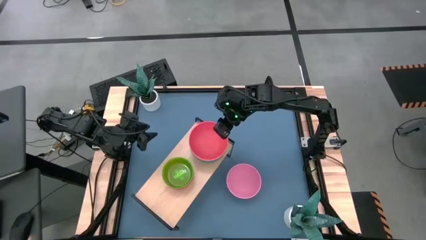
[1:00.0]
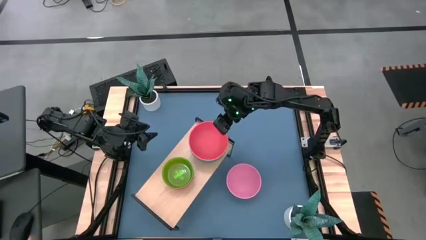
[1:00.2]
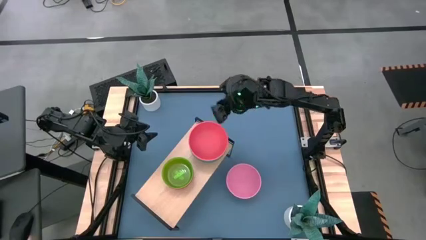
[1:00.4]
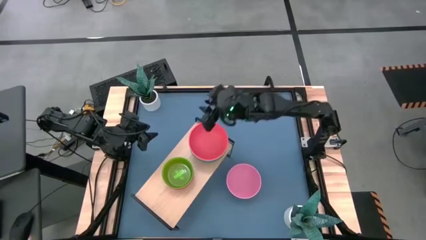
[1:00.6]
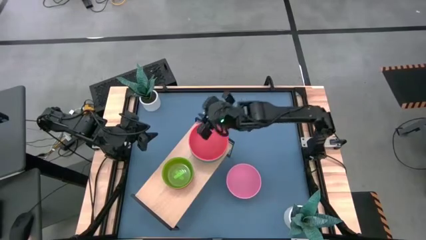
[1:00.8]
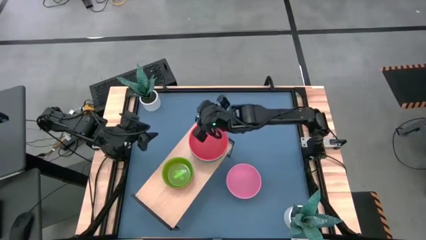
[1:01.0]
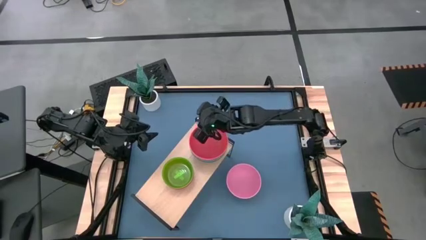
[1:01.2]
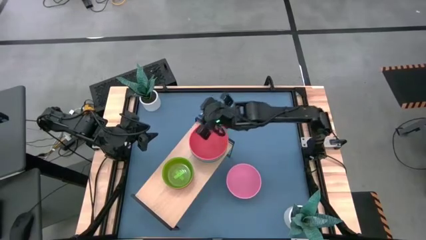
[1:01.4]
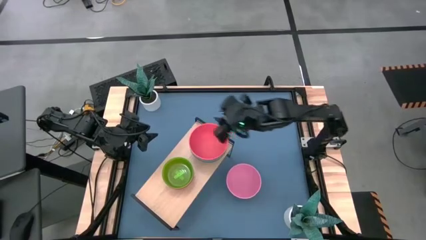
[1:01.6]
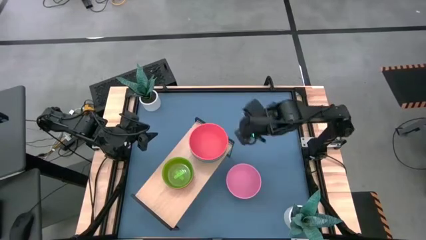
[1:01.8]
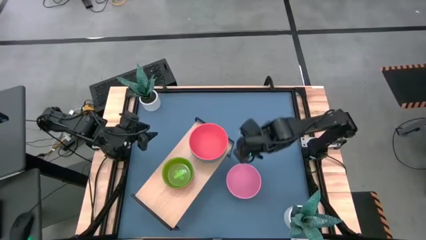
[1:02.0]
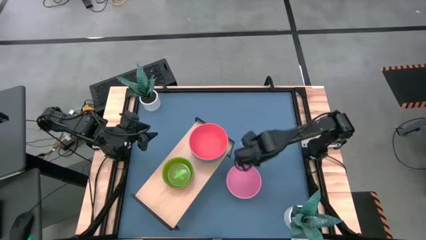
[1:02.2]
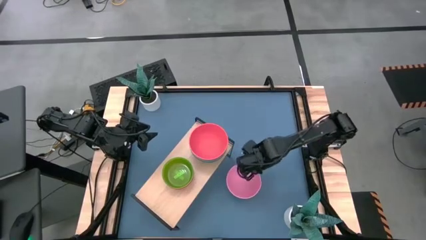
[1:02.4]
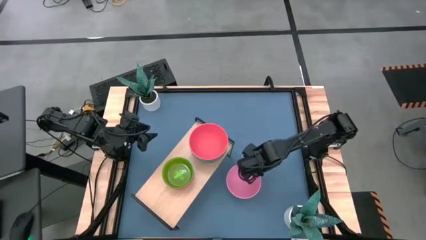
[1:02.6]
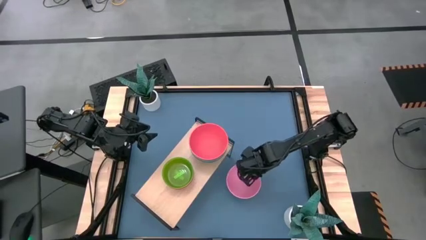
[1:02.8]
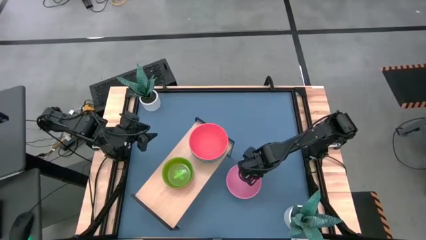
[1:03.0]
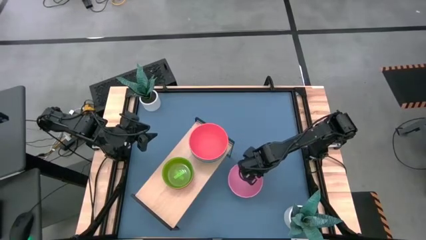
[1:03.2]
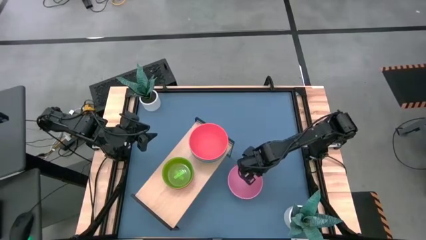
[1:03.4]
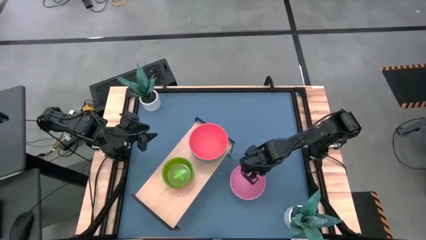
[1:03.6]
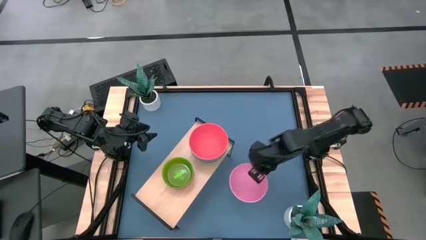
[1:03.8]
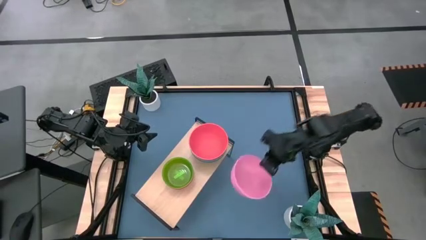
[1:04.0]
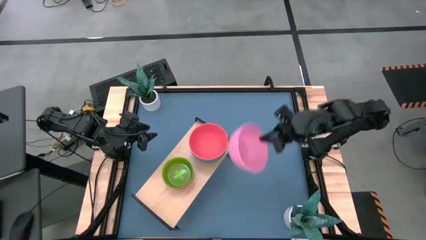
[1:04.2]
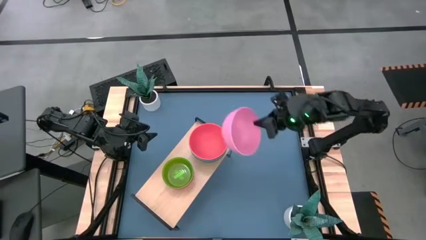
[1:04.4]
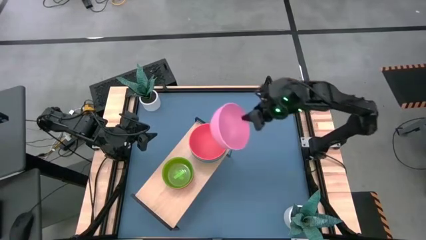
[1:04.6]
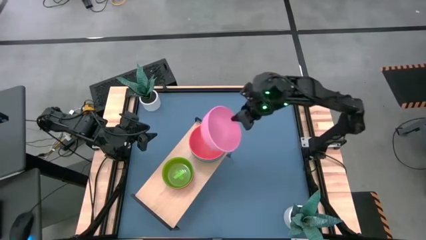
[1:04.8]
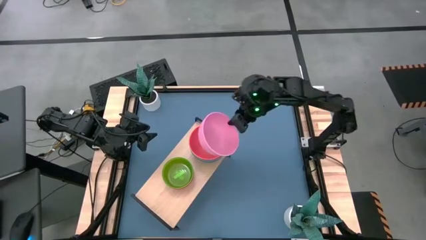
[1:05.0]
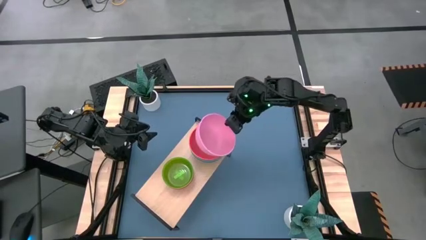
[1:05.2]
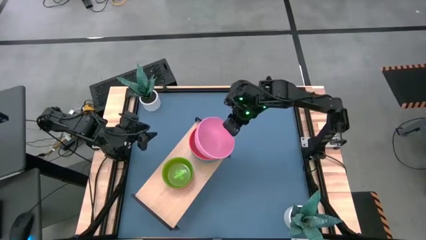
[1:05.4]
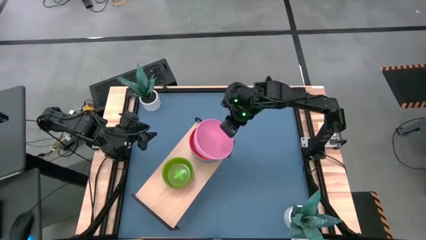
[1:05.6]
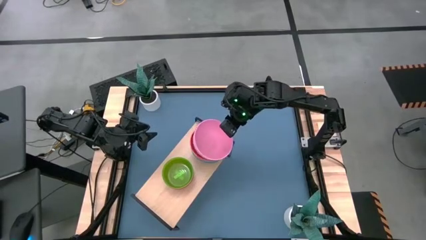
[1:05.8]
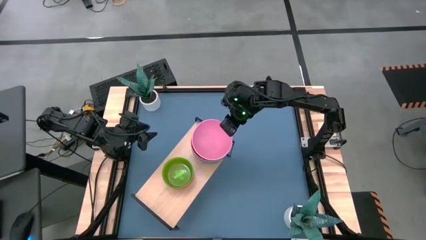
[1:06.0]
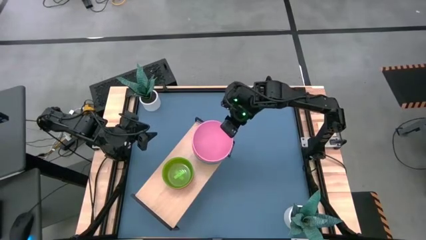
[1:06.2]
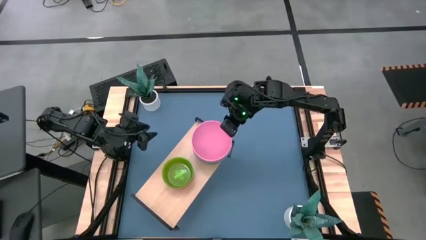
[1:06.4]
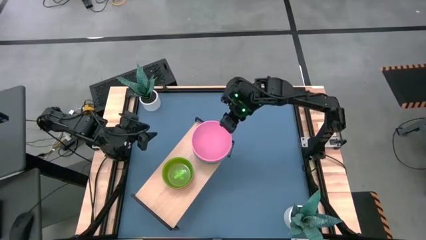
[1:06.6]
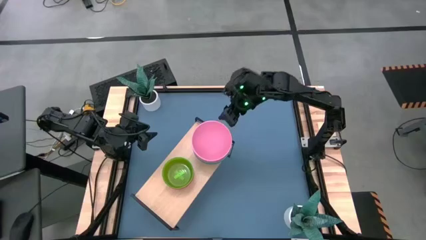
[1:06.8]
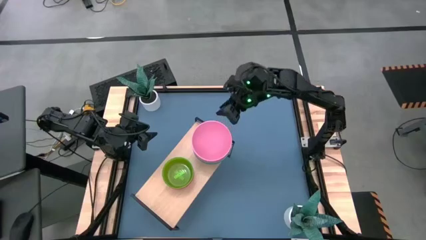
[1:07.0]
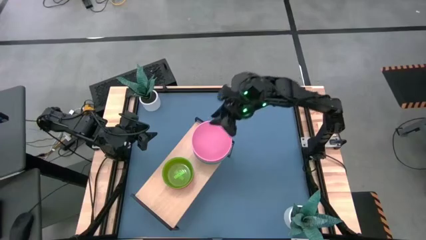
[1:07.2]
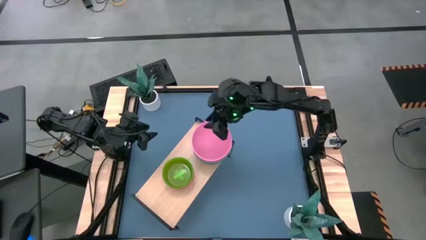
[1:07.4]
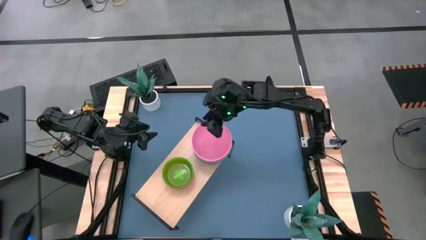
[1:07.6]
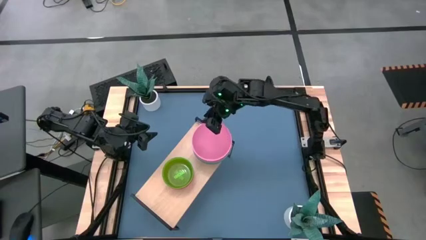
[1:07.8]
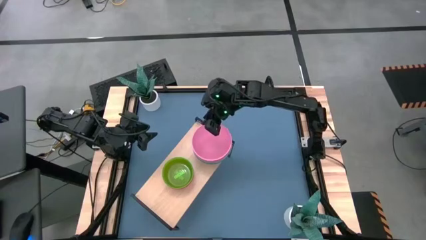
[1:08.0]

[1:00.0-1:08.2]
Task: Place and stack bowls onto a shelf
Stack the pink bowl on top of the orange bowl on shelf

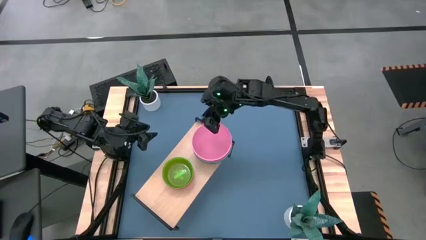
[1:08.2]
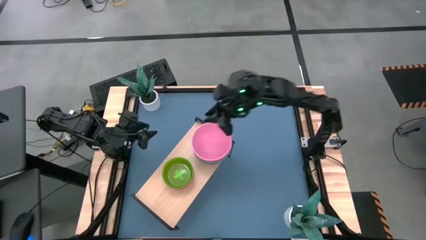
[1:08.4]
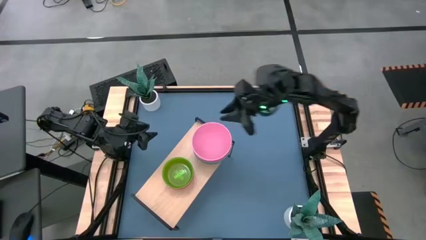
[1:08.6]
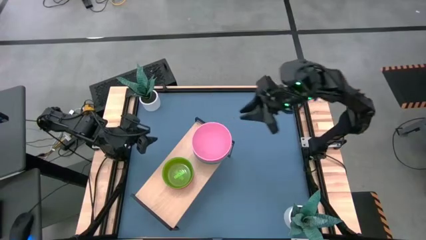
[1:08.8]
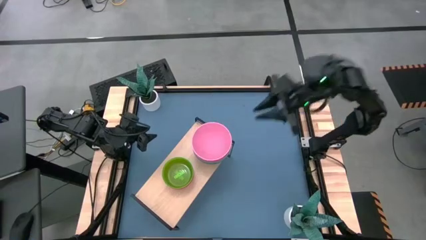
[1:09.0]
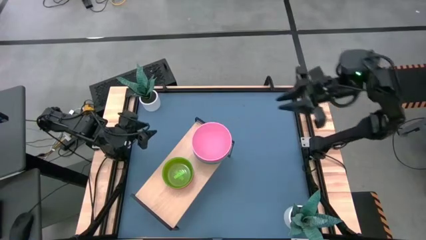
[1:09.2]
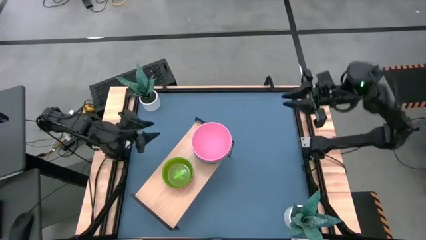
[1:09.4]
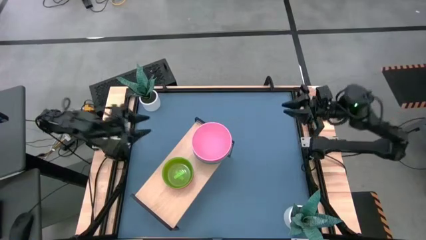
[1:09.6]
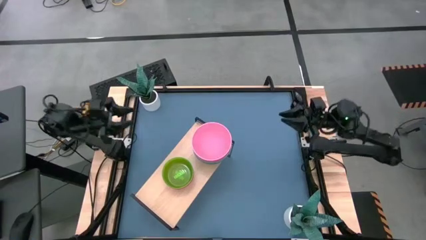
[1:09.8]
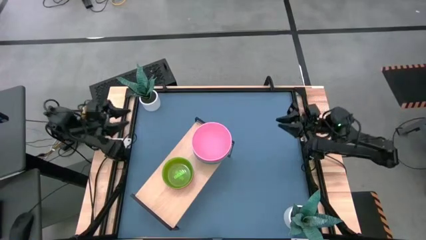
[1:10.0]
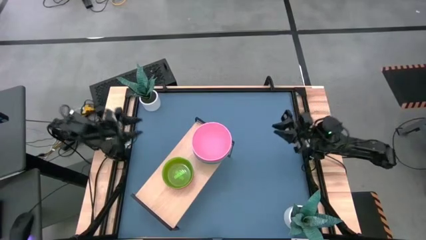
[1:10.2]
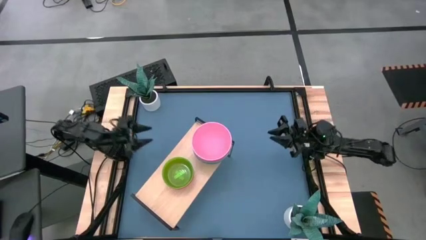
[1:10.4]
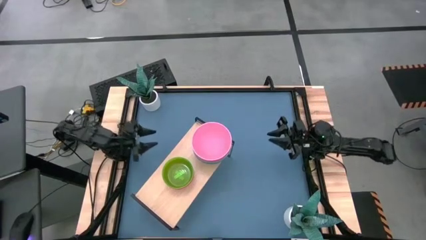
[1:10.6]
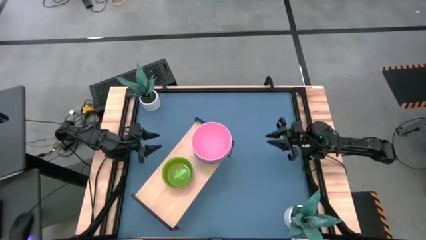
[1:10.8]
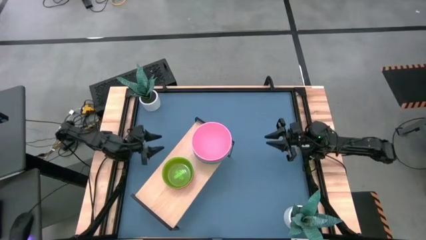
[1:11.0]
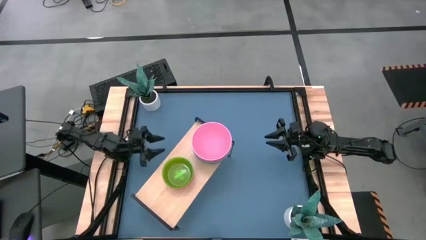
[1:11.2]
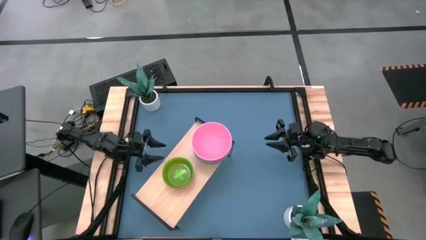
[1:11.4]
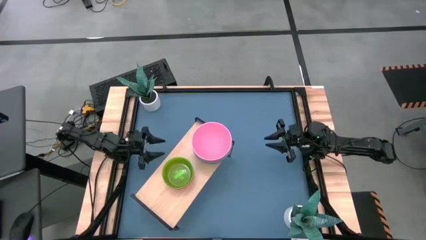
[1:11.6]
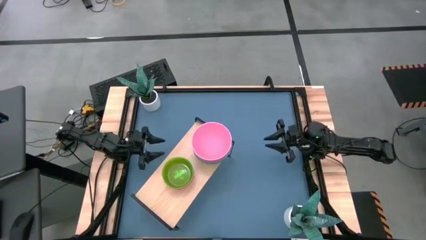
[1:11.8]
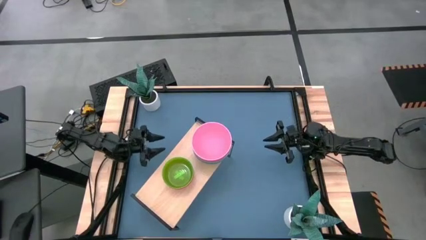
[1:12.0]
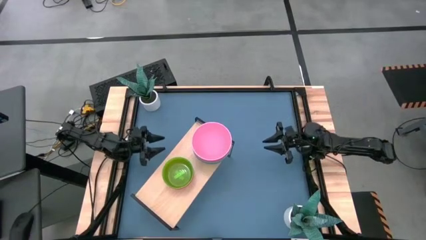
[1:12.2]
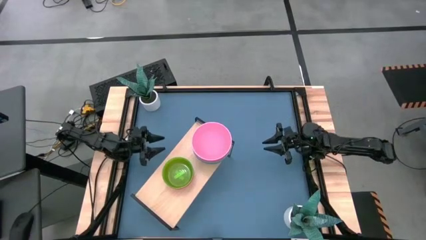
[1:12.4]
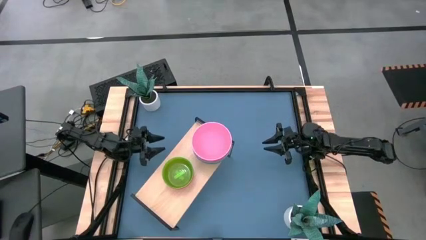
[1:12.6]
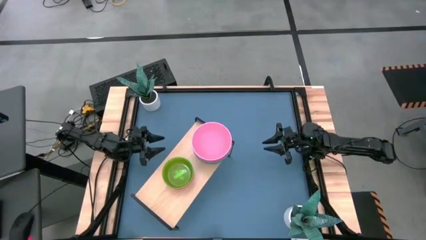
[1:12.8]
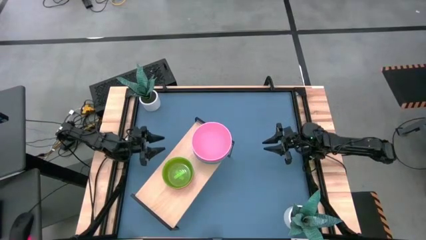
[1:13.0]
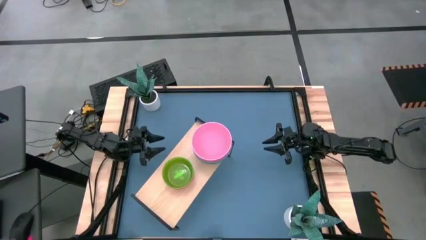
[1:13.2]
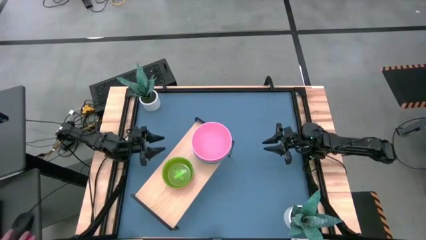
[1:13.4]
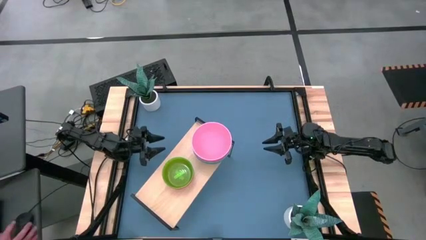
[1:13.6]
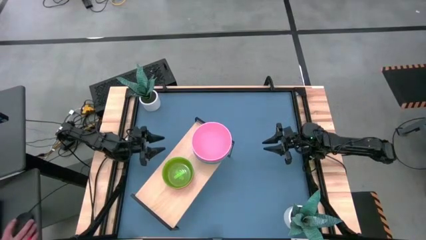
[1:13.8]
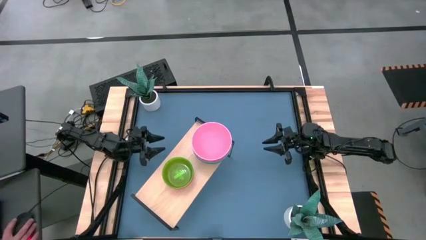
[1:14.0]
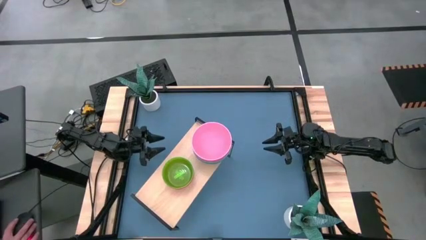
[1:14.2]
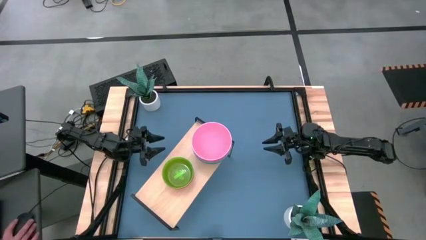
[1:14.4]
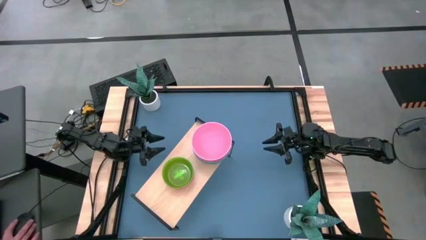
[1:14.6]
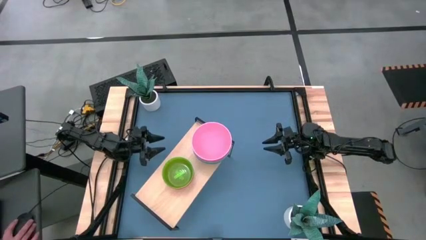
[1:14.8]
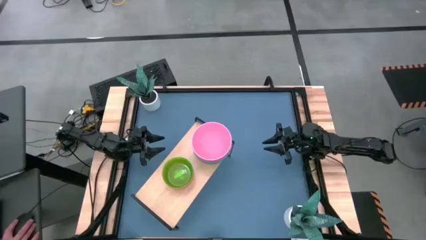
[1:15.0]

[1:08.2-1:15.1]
Return to Home Position

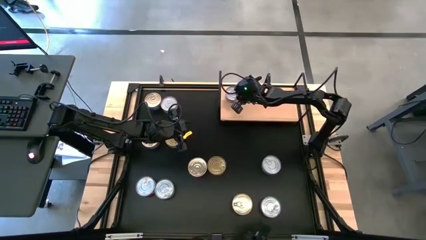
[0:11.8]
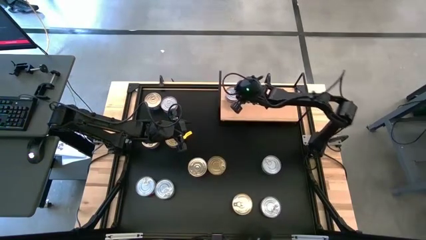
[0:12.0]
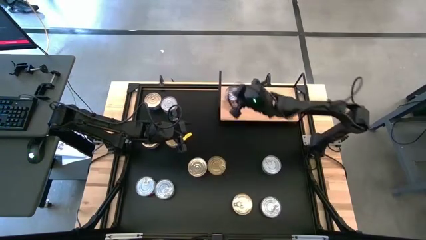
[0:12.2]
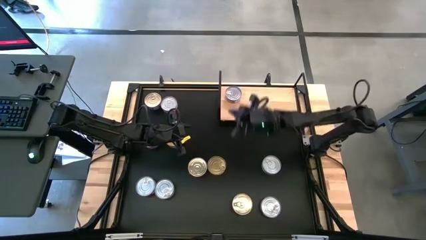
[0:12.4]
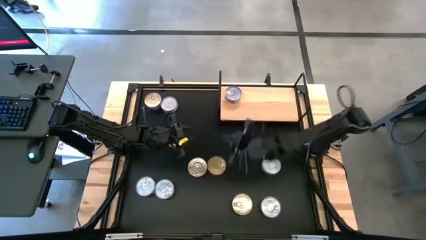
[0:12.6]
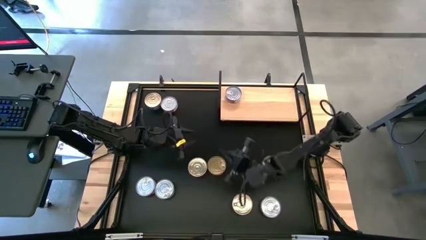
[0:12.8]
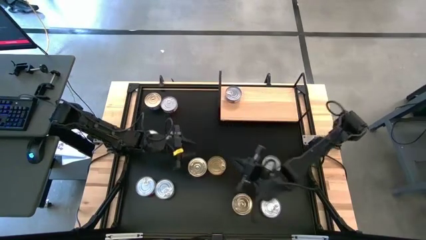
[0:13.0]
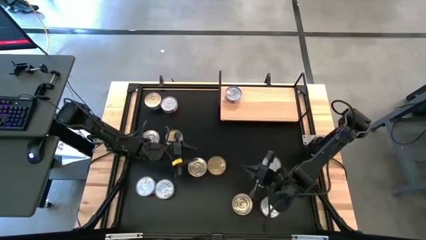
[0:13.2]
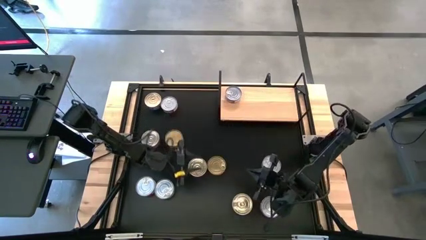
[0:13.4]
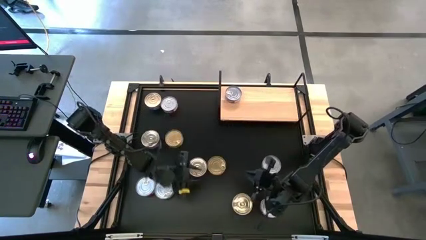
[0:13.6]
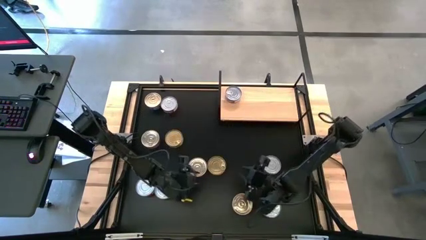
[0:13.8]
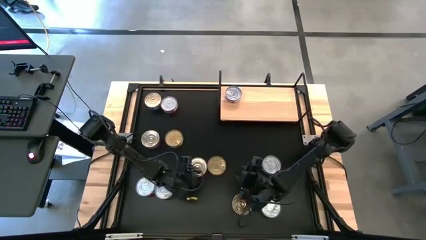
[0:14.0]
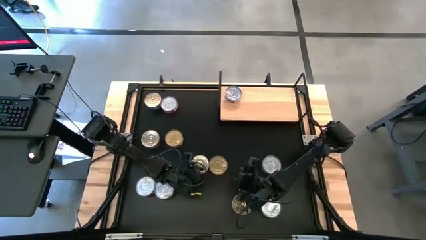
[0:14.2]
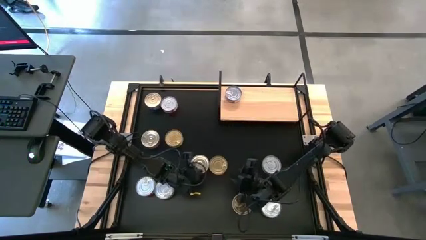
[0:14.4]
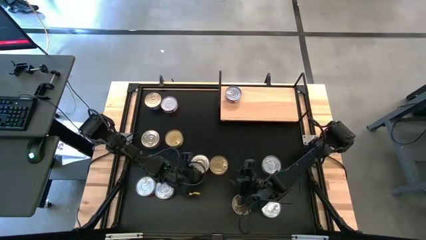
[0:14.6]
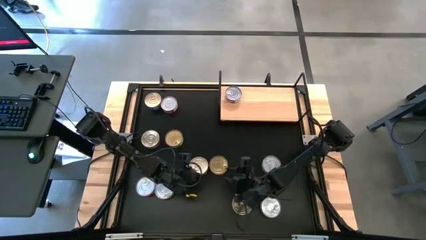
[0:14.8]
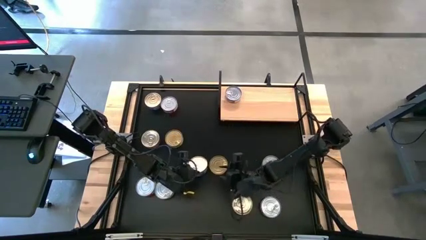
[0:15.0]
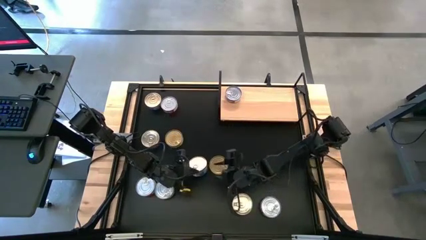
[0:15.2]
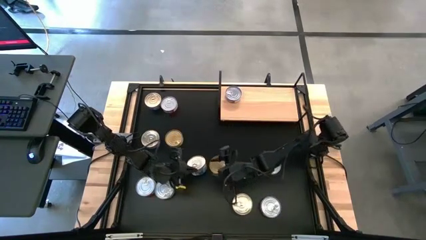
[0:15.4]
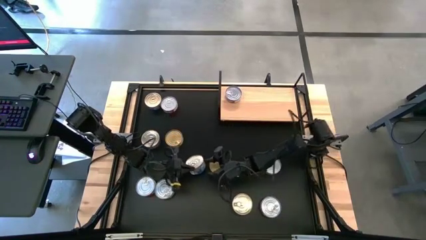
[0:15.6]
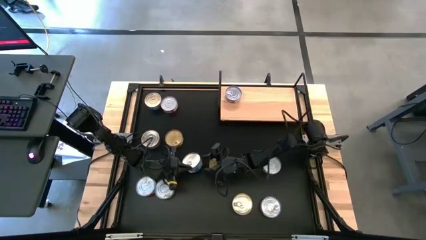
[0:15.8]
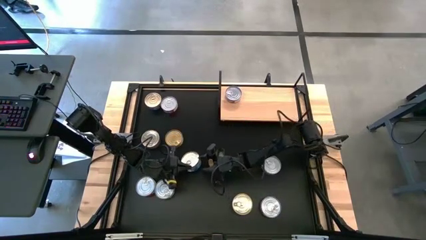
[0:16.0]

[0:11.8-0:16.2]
Task: Stack canned seafood by type on shelf
Put the blue-pink tuna can on the shelf
